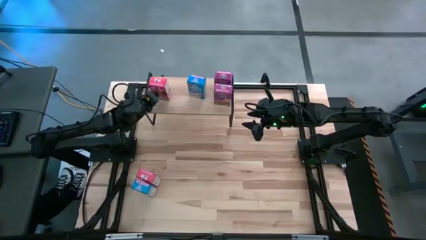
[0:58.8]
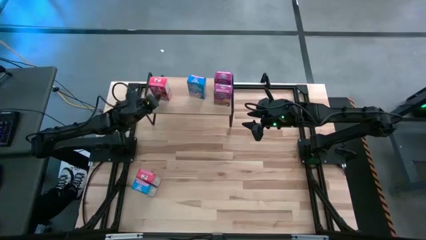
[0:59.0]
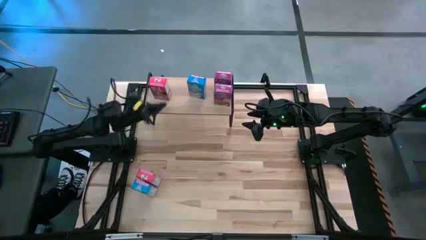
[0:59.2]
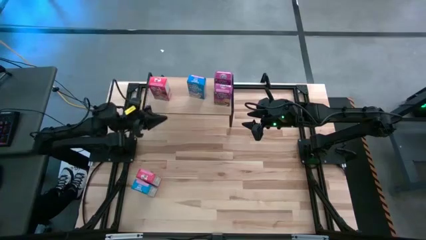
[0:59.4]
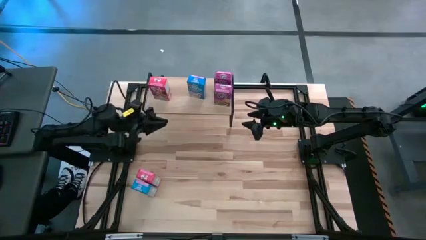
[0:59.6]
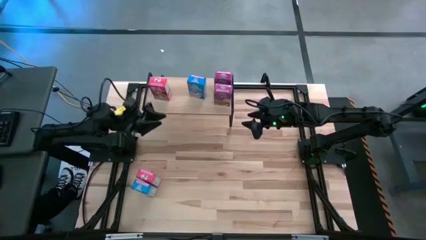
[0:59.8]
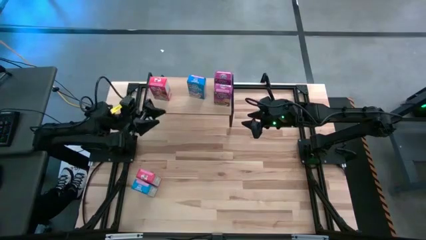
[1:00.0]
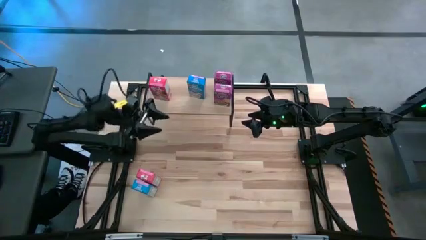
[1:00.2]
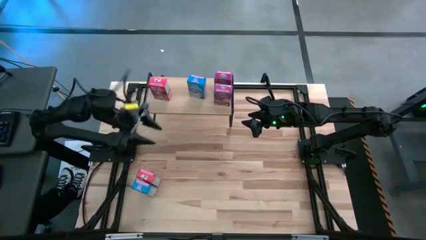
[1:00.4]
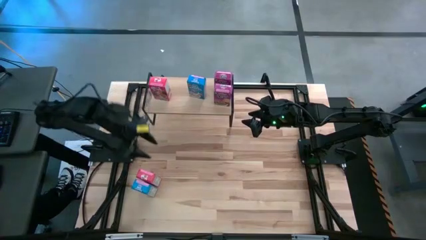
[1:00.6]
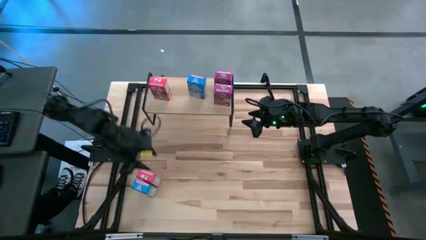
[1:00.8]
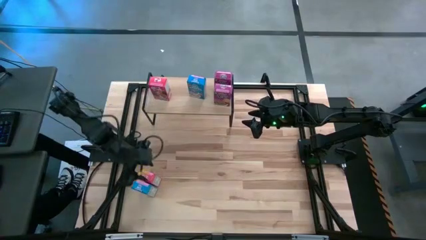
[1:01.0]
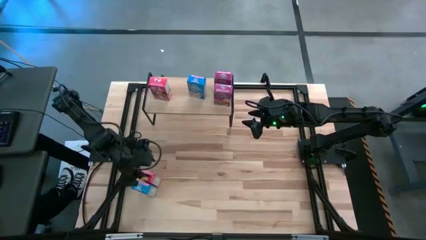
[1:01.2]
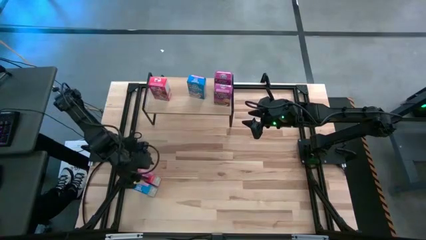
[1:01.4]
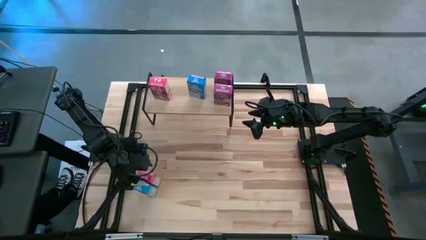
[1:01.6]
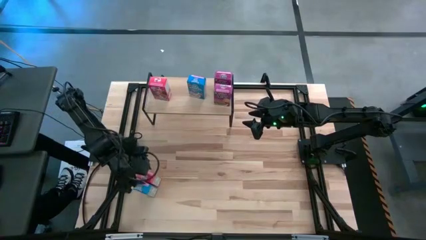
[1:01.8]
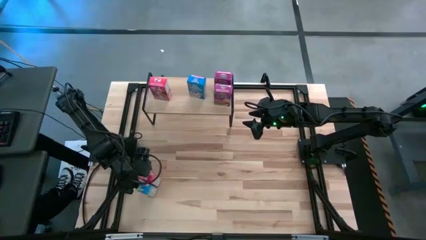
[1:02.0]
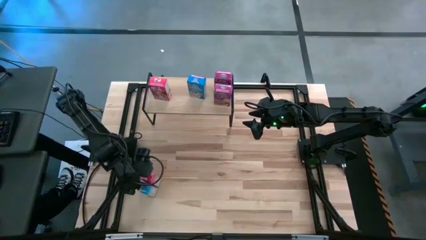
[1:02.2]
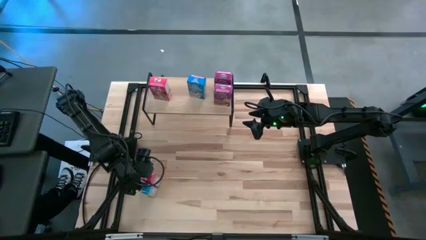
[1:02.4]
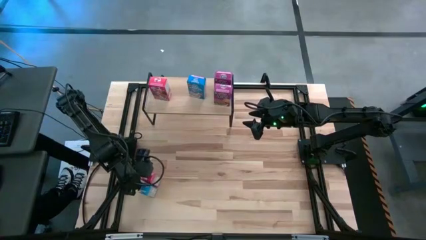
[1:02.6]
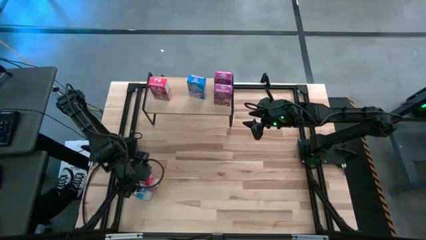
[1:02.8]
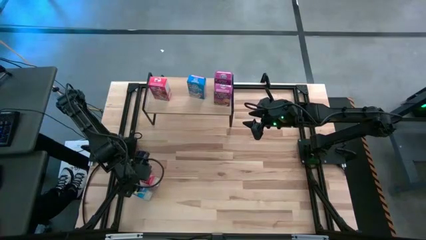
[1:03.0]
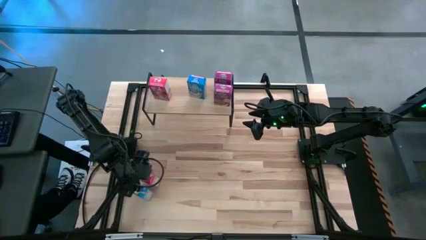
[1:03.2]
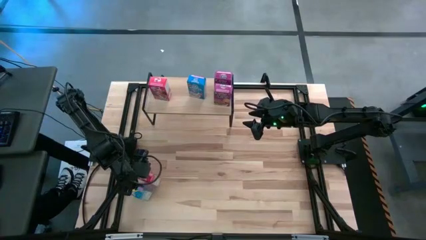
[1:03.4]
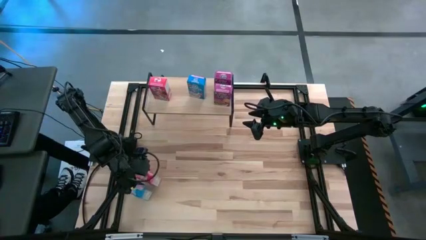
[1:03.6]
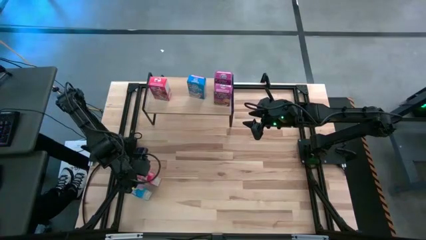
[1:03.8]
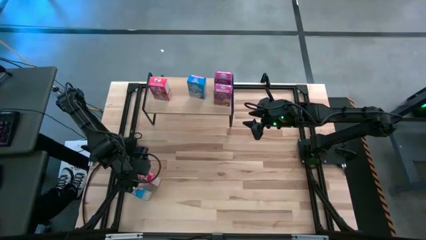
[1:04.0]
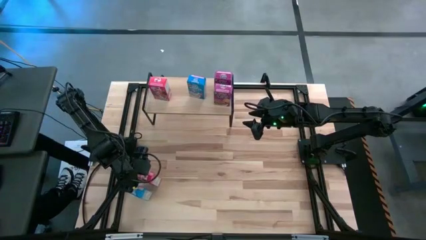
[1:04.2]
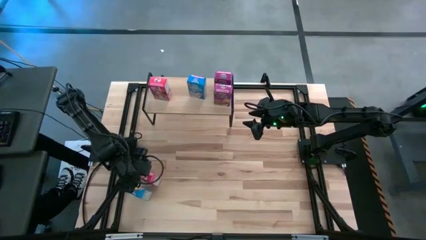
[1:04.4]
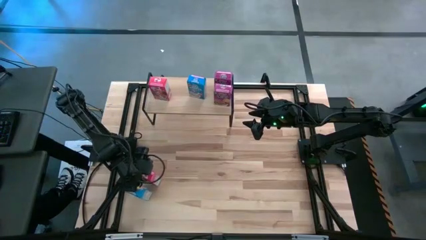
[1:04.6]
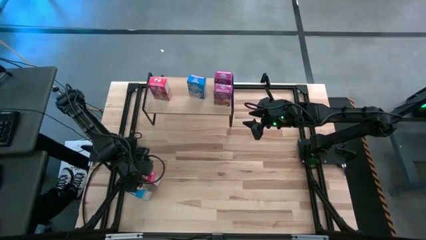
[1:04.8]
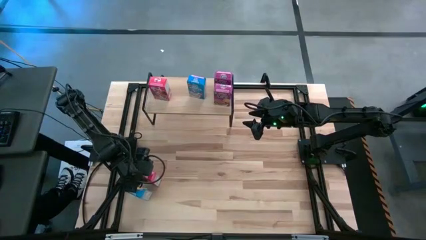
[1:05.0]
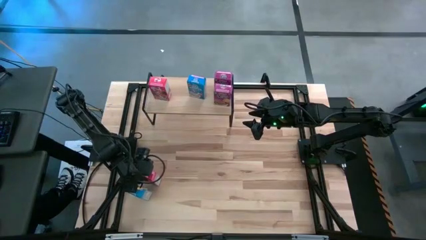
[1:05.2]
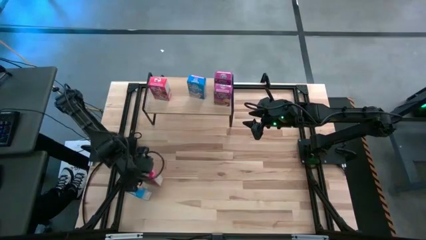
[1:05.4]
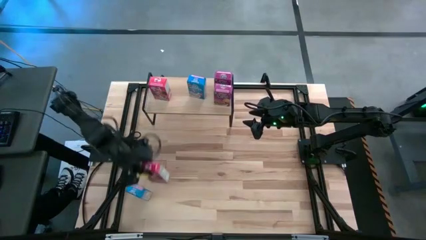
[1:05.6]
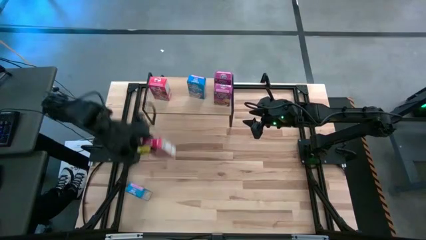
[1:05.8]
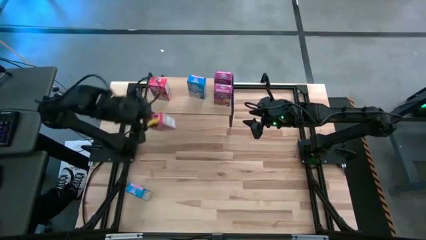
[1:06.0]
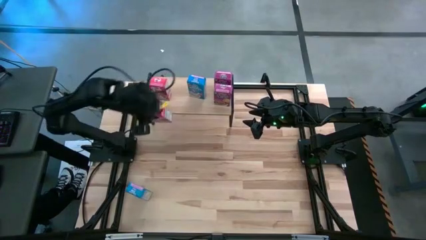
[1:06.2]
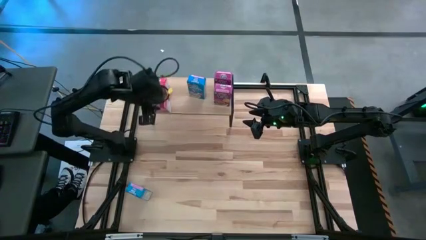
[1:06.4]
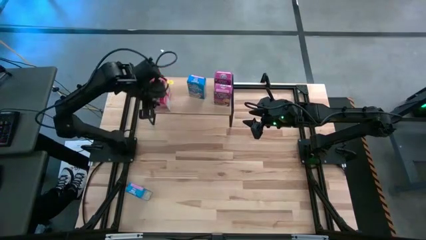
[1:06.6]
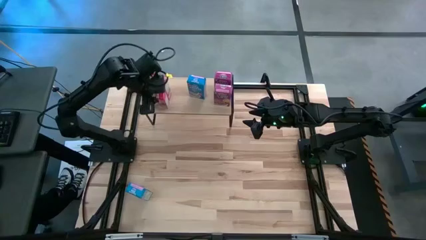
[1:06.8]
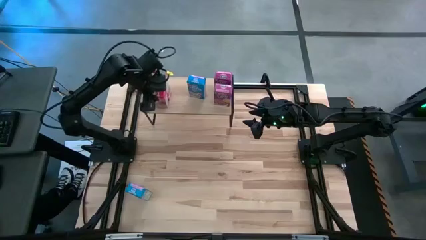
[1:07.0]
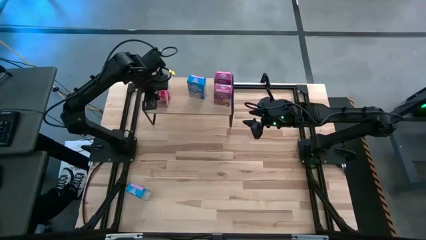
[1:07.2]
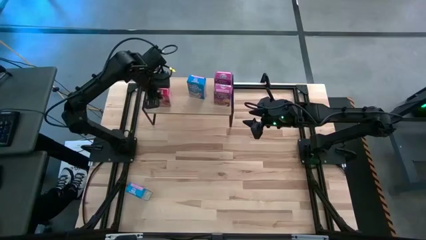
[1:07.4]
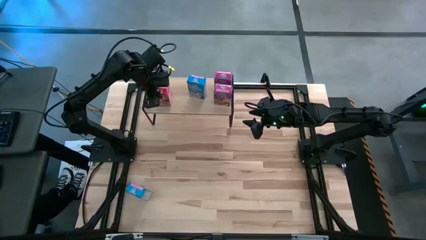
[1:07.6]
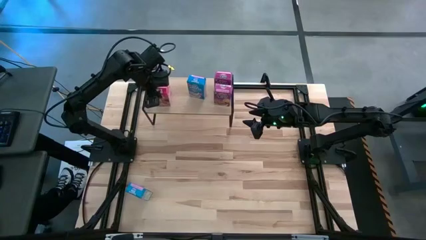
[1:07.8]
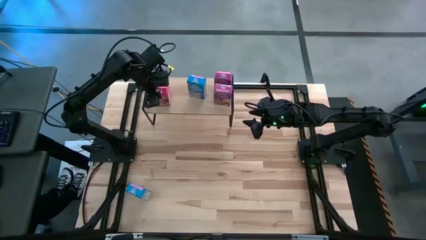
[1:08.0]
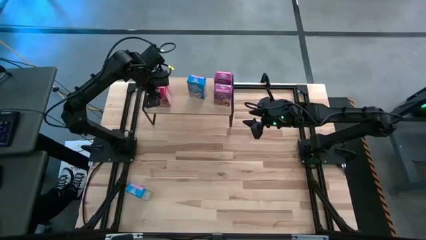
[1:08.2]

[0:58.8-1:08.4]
Task: Stack cereal on shelf
Put the red cereal box on the shelf

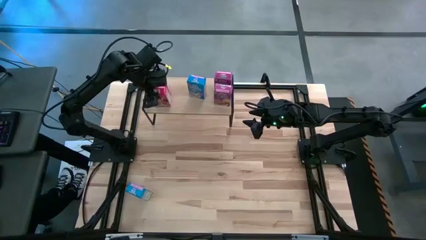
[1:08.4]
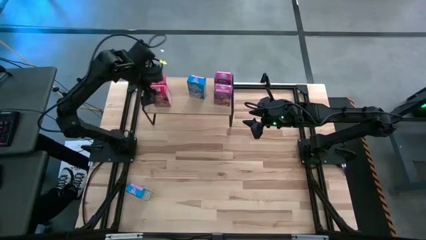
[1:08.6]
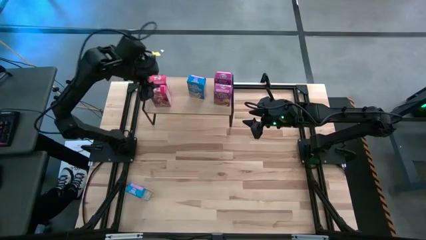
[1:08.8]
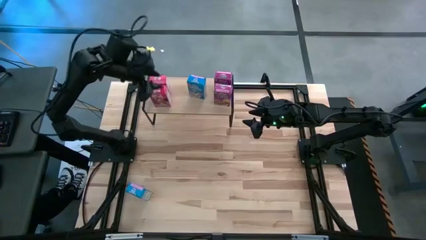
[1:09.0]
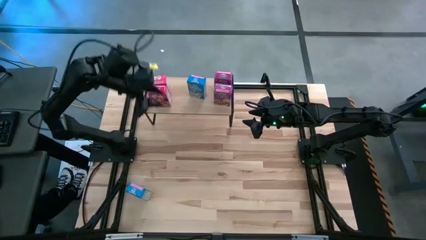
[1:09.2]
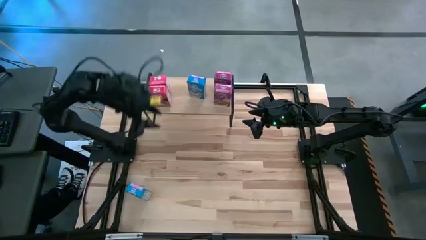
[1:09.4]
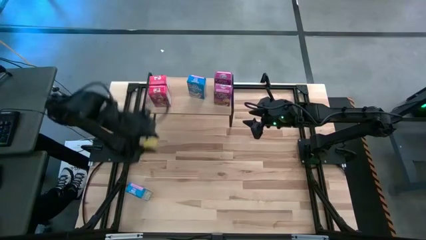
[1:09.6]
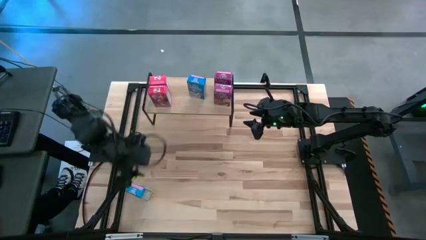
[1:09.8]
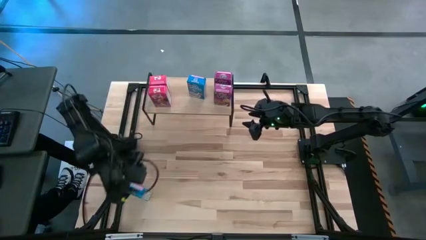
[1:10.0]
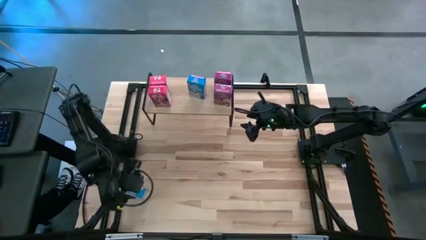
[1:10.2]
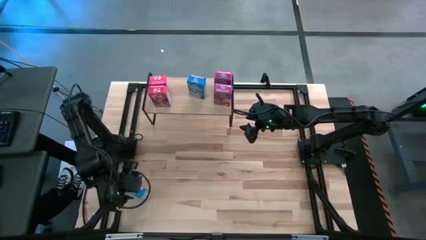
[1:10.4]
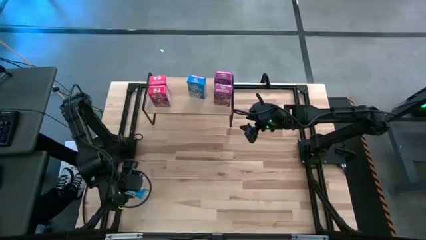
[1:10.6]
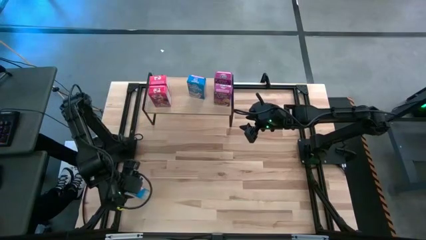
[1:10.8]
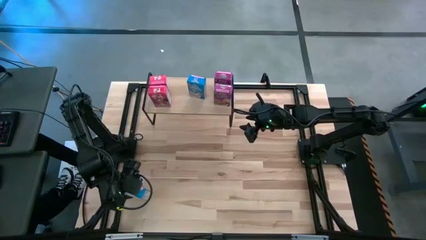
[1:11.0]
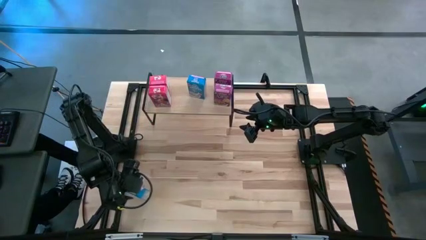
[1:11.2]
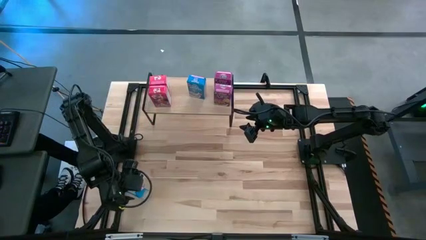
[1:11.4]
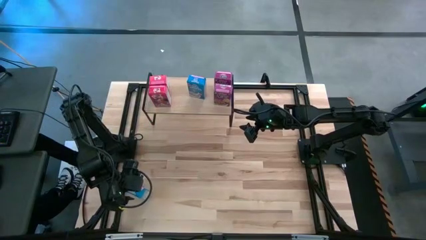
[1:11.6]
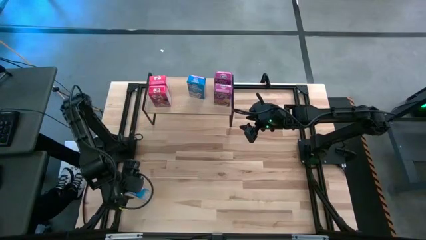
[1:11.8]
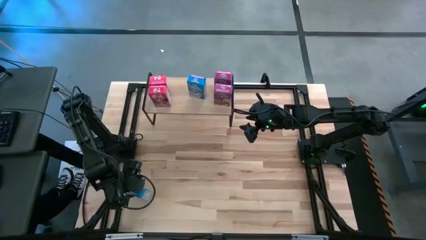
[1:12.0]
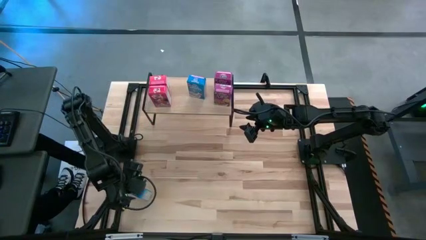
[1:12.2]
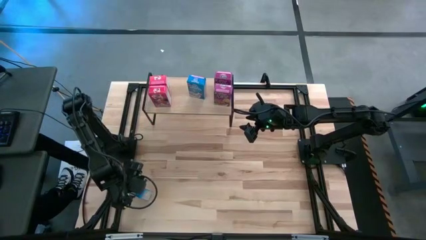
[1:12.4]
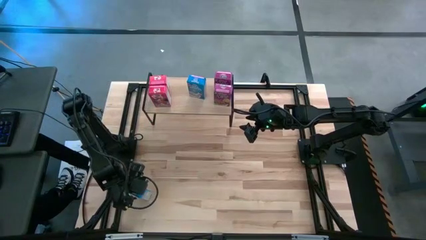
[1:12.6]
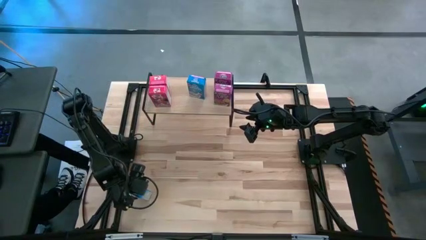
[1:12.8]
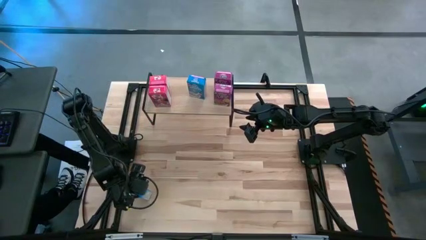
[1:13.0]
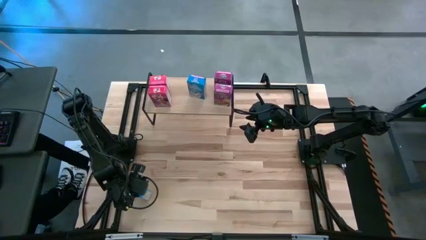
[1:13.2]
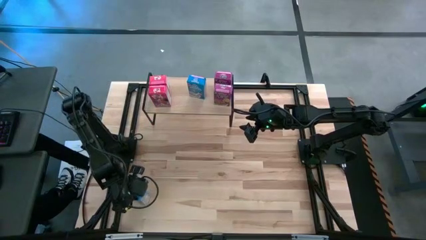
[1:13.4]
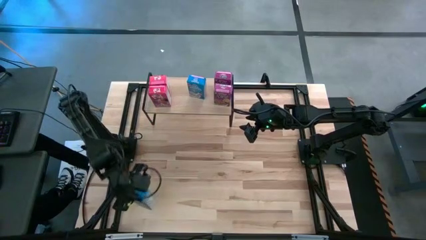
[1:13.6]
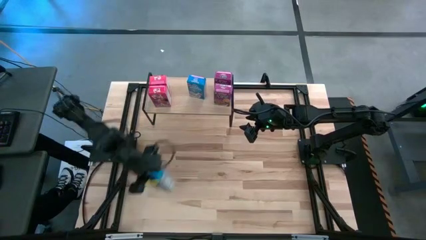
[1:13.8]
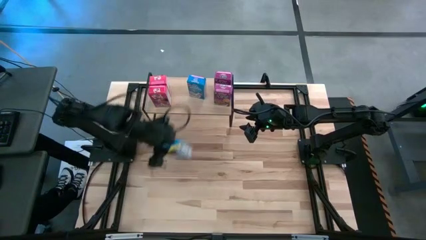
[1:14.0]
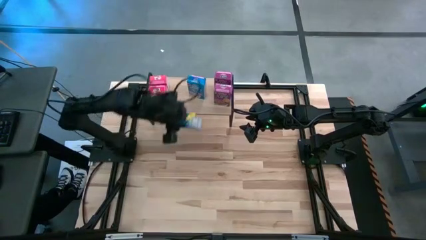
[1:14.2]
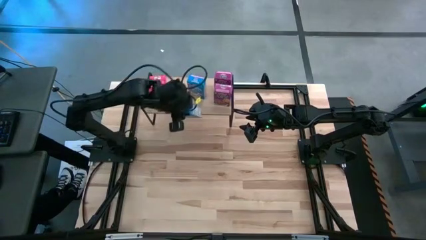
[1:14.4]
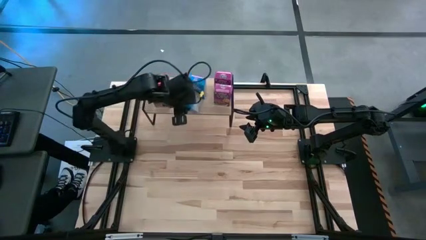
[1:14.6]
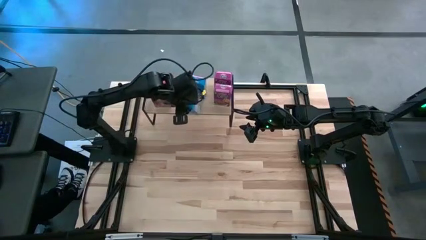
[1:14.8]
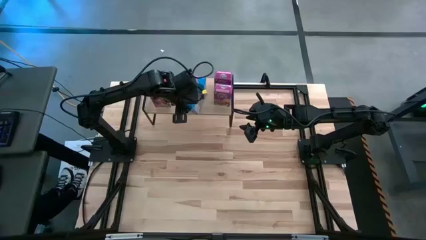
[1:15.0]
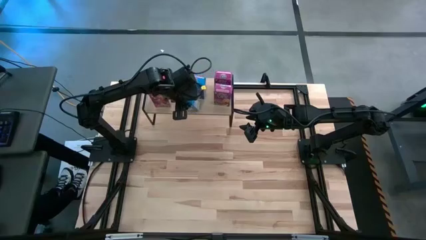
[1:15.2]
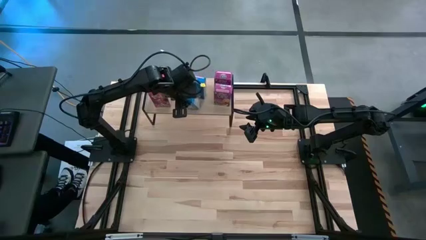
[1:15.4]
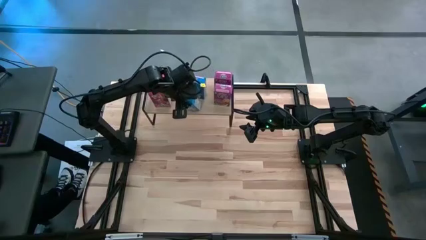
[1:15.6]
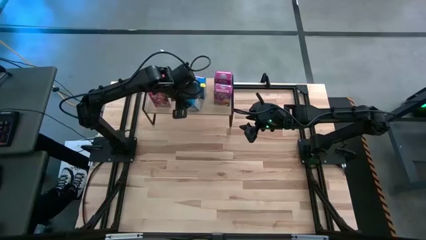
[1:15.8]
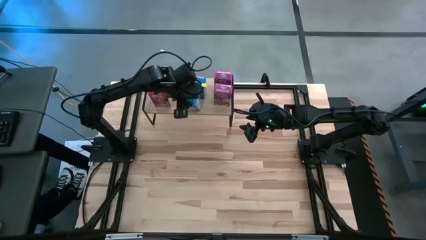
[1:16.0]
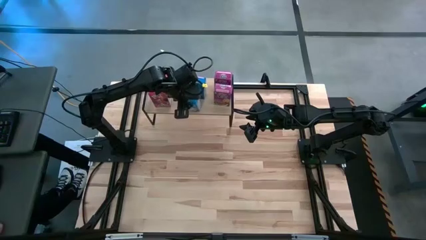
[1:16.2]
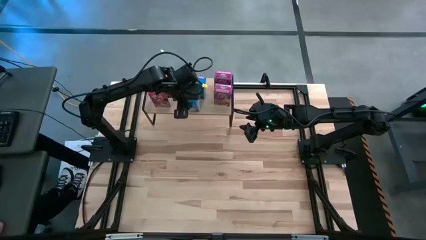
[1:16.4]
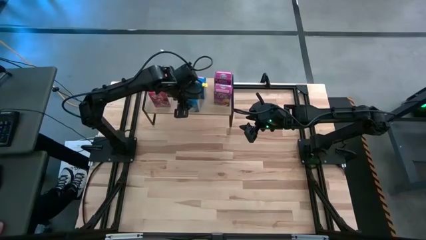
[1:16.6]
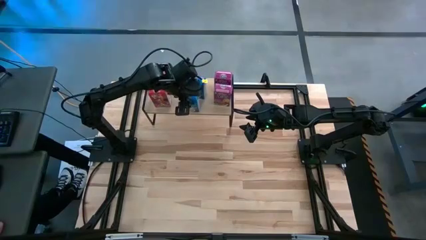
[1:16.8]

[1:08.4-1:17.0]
Put the blue cereal box on the shelf
